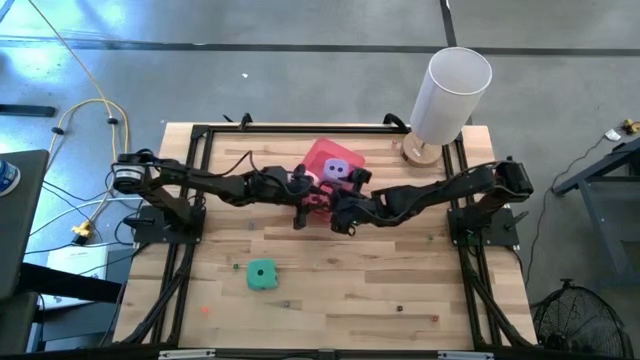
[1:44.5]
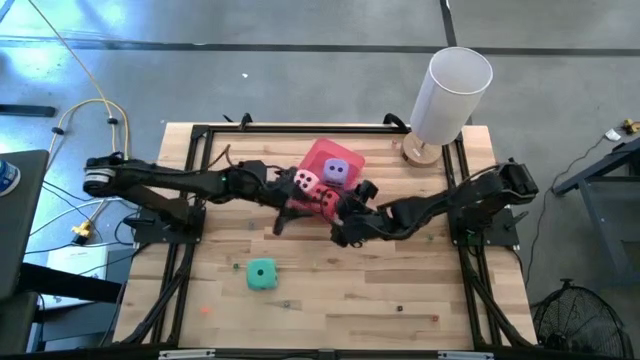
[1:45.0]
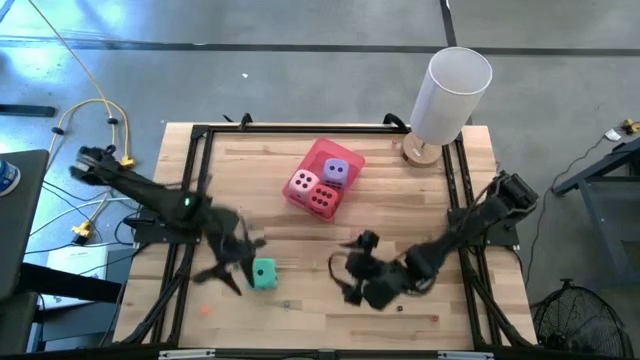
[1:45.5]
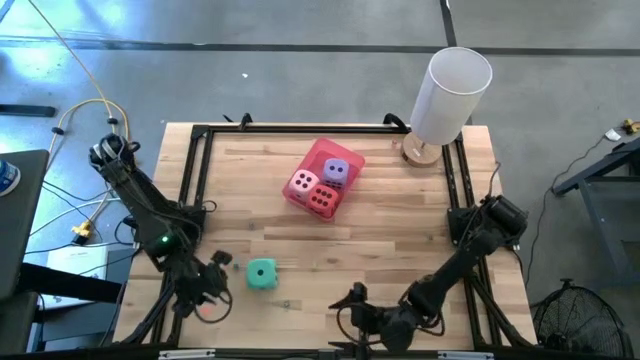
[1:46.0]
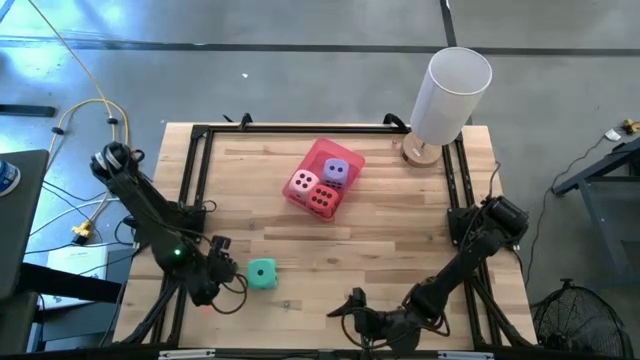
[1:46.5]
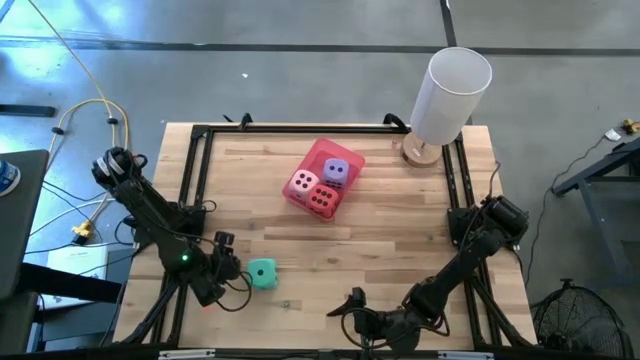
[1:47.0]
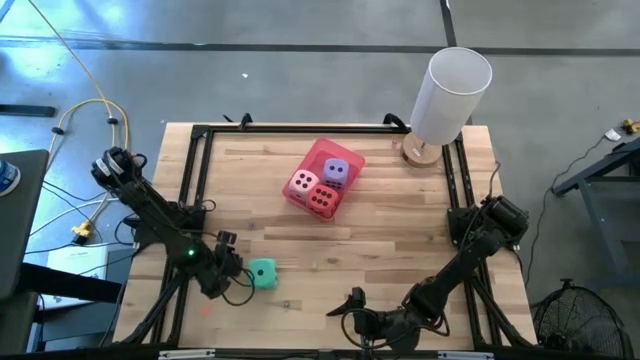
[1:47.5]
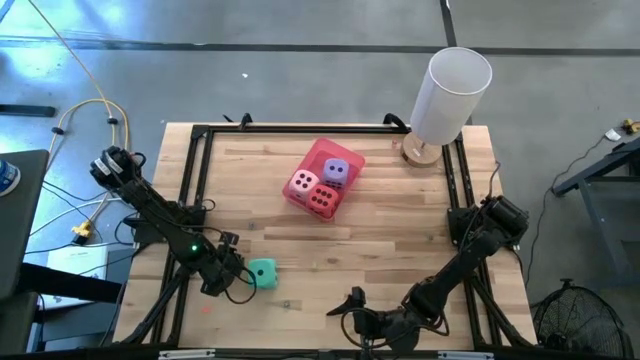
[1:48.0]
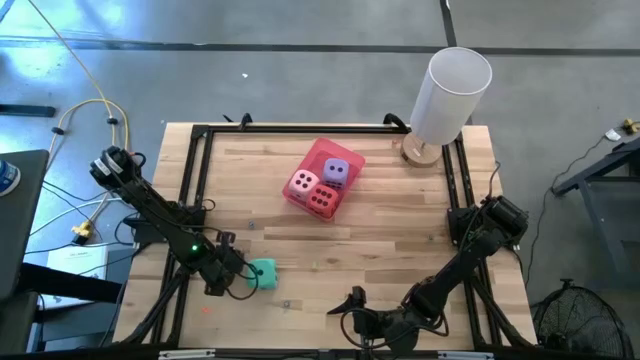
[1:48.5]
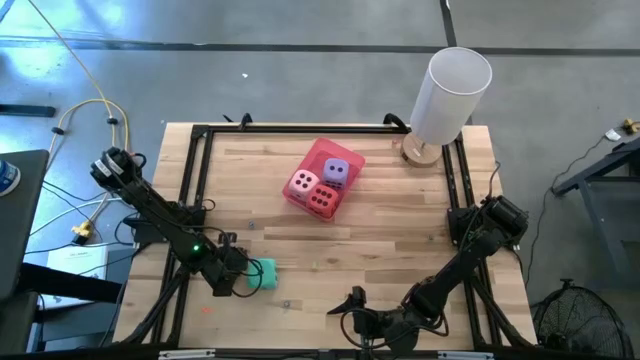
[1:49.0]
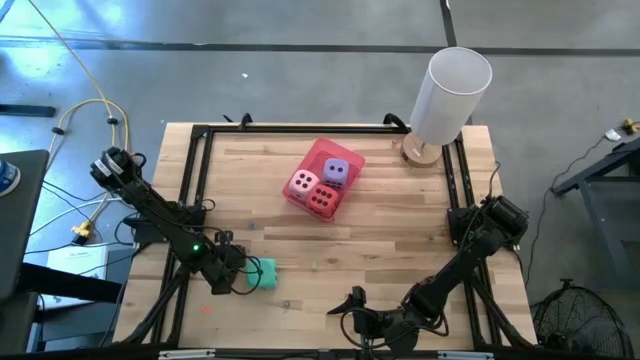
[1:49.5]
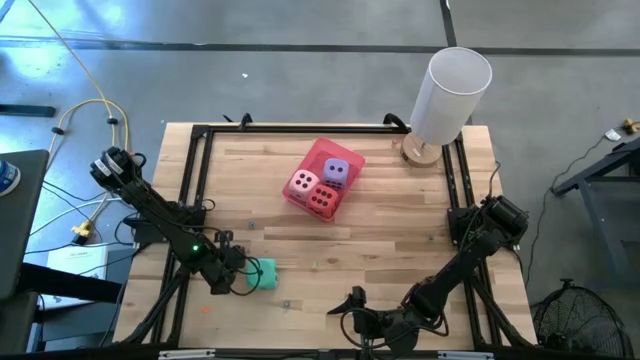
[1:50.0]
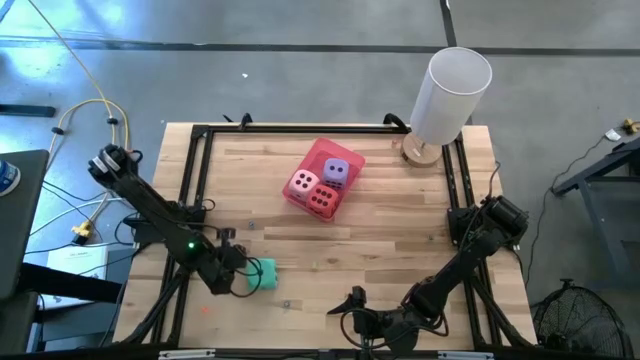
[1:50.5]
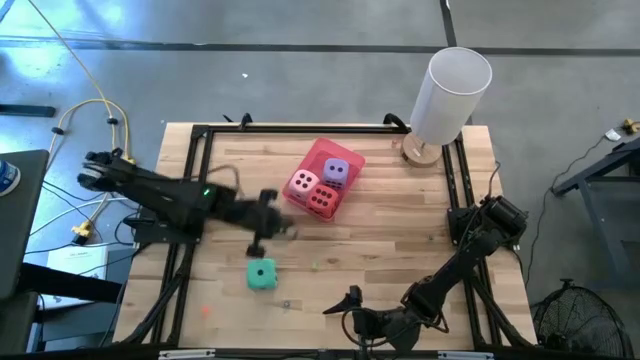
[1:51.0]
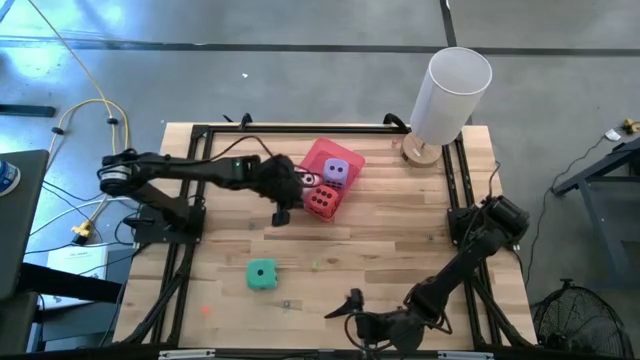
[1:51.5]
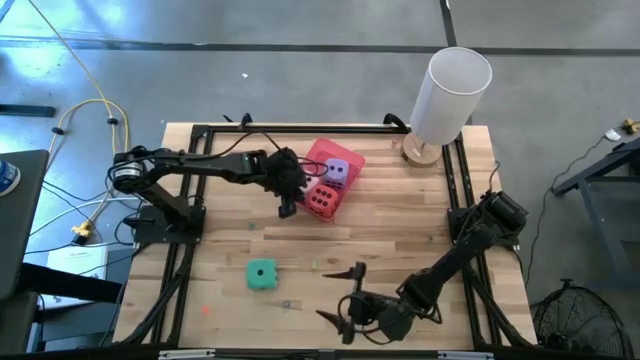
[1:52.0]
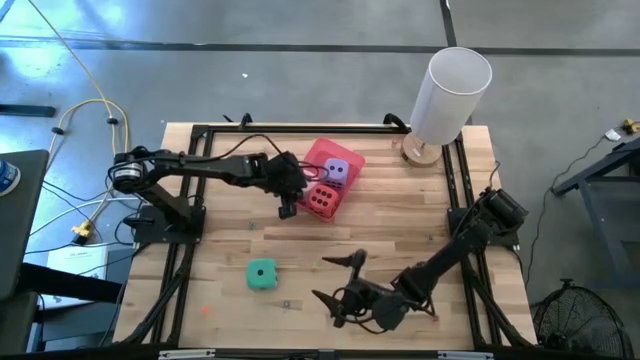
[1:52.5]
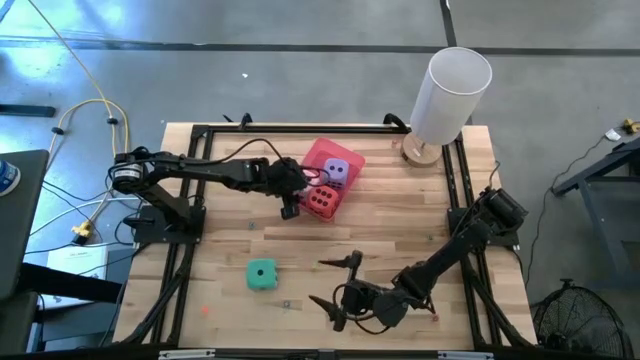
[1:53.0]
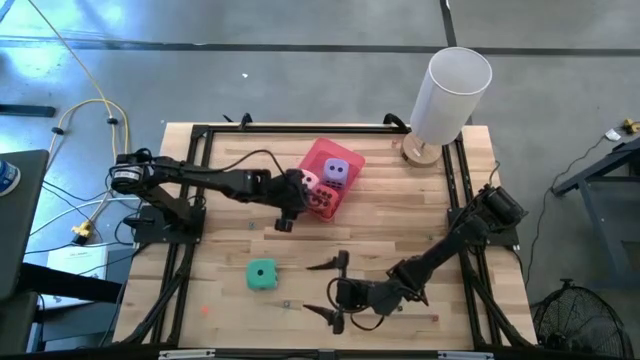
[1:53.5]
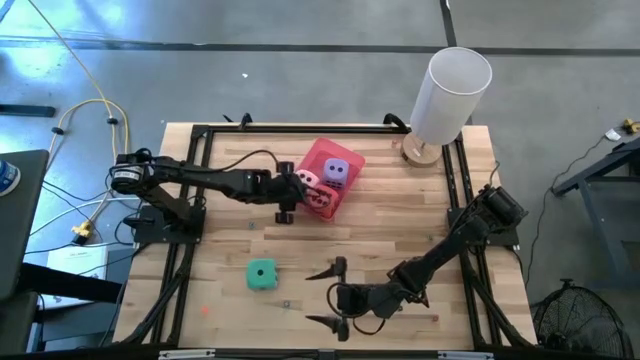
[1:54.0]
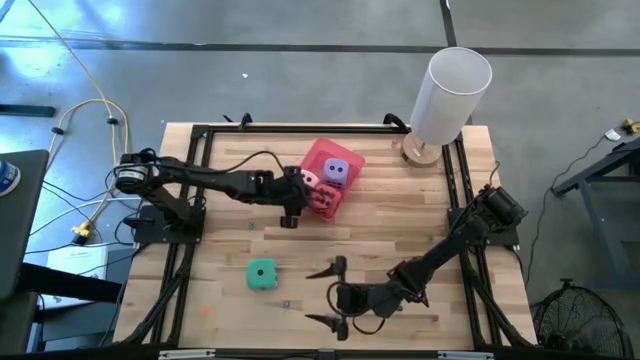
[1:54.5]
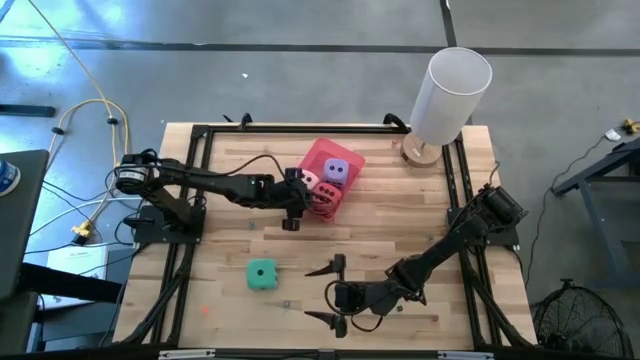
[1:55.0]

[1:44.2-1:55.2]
Task: Pick & Place Dice
Put the small green die into the red bin

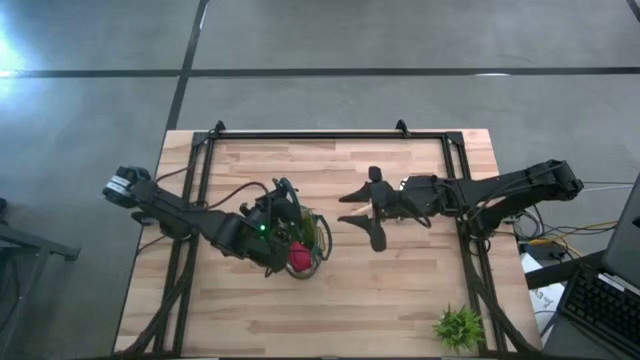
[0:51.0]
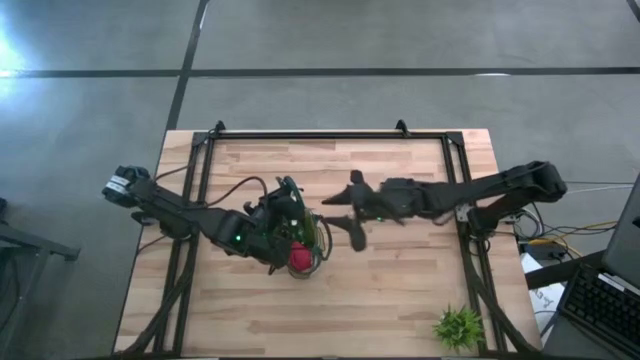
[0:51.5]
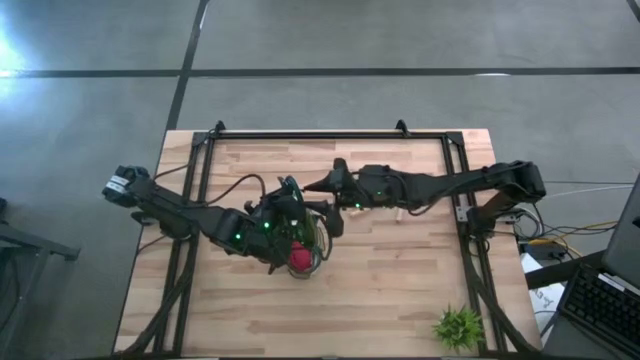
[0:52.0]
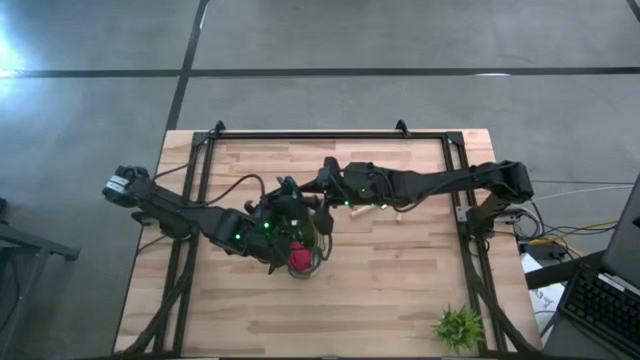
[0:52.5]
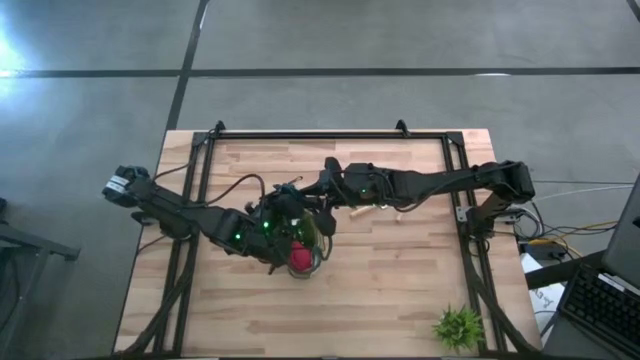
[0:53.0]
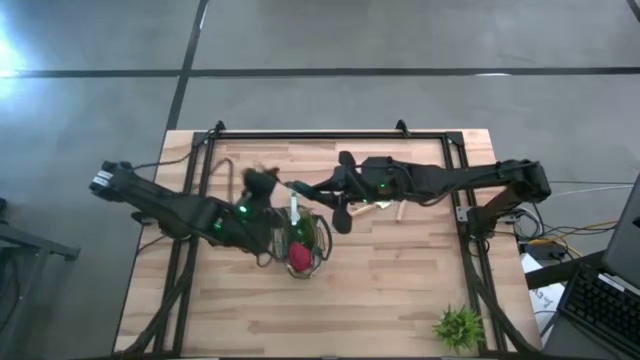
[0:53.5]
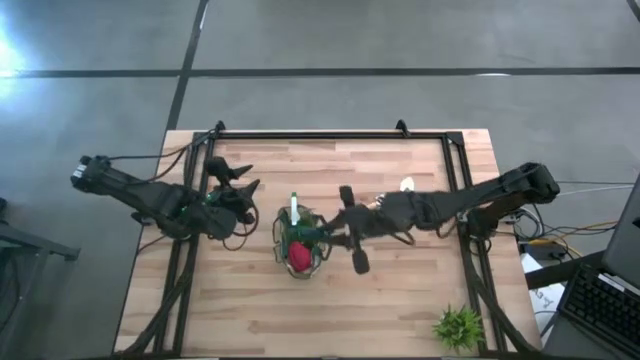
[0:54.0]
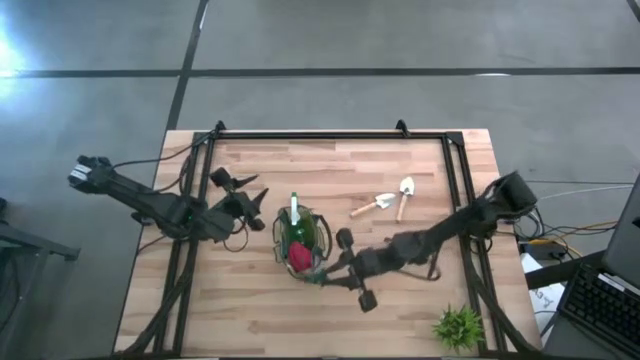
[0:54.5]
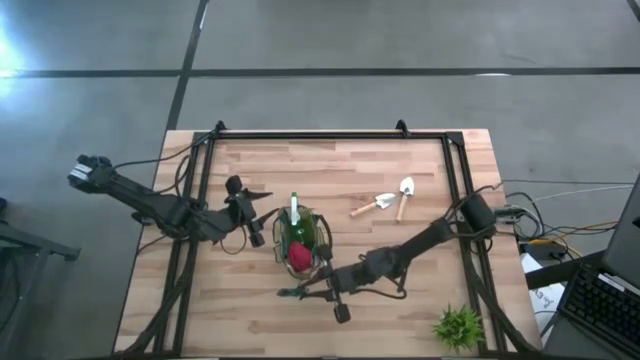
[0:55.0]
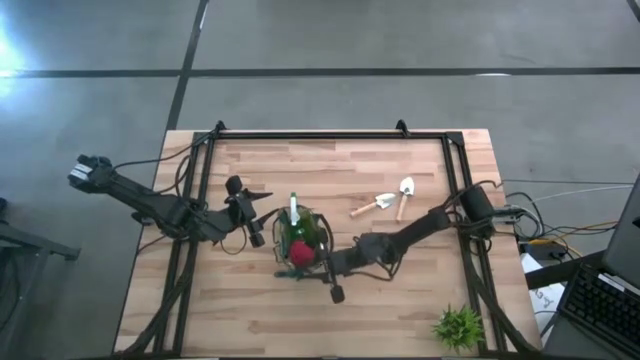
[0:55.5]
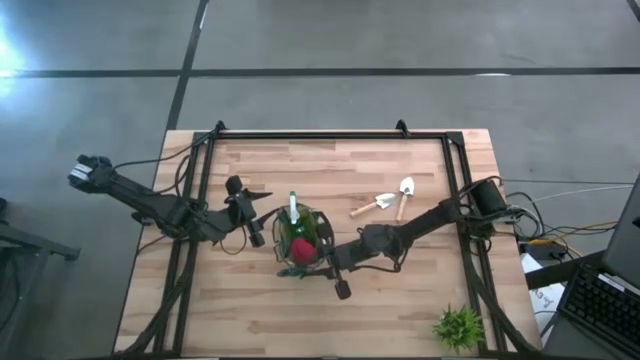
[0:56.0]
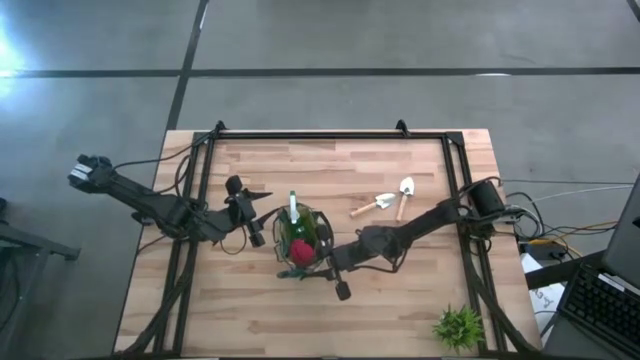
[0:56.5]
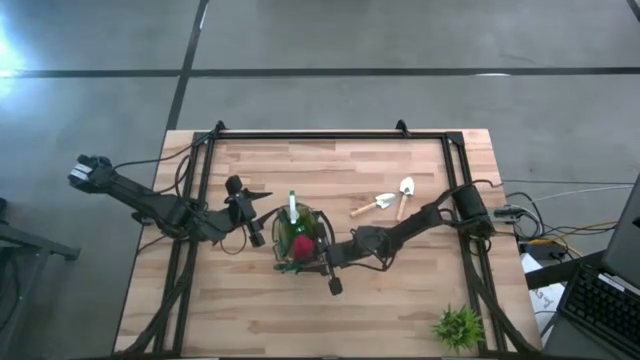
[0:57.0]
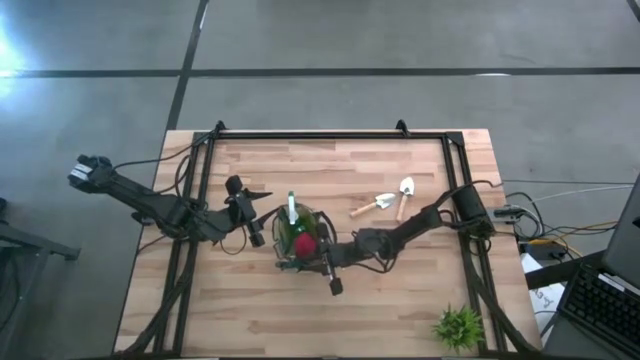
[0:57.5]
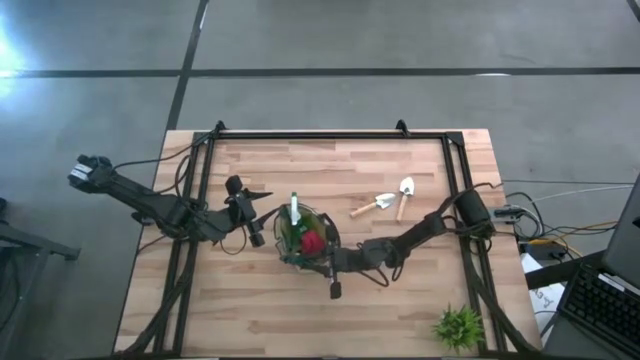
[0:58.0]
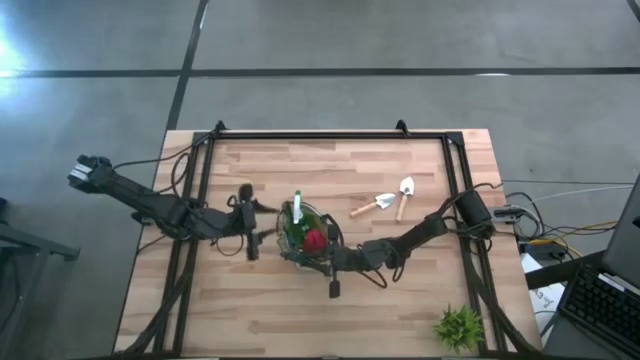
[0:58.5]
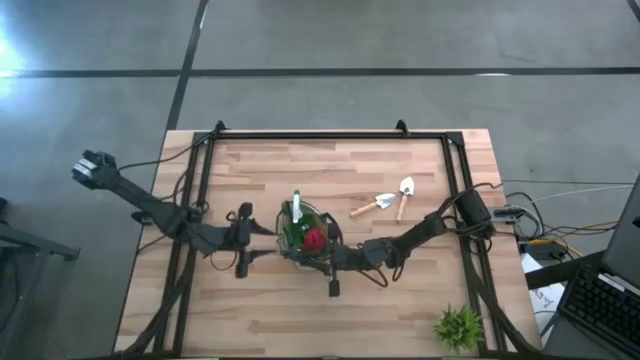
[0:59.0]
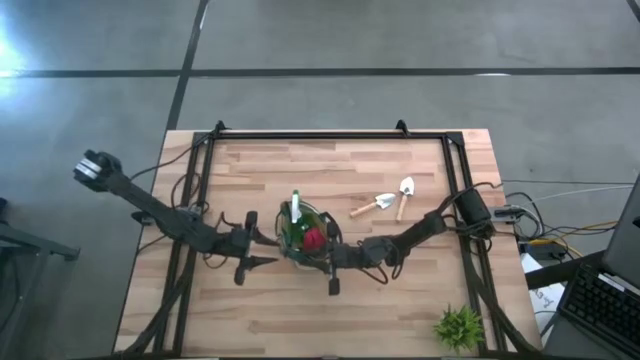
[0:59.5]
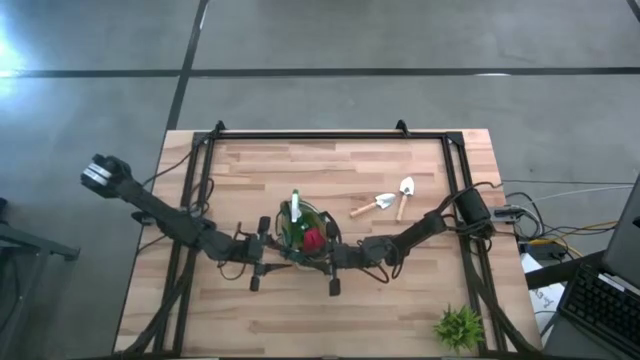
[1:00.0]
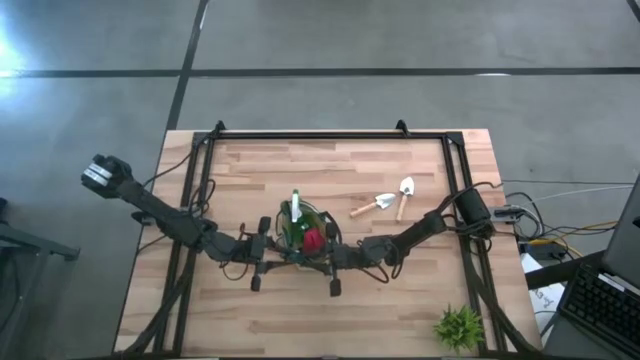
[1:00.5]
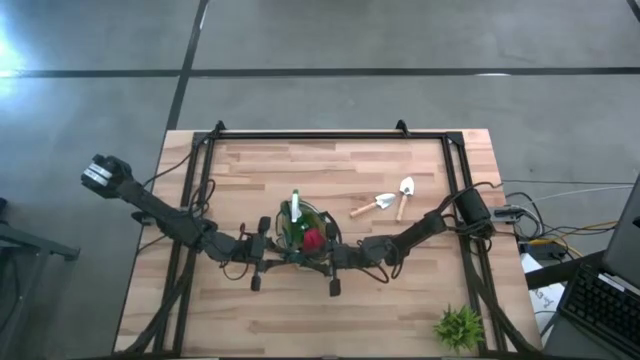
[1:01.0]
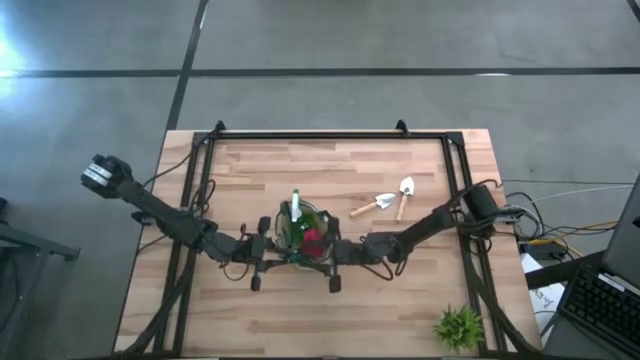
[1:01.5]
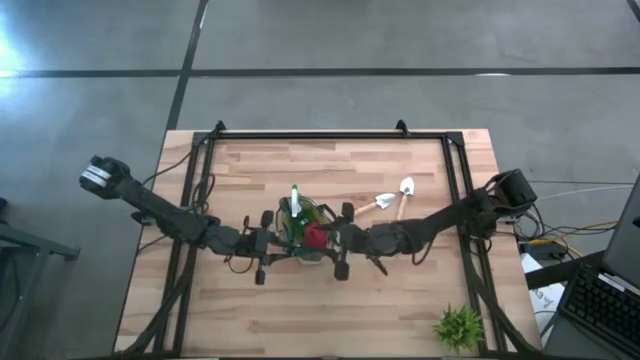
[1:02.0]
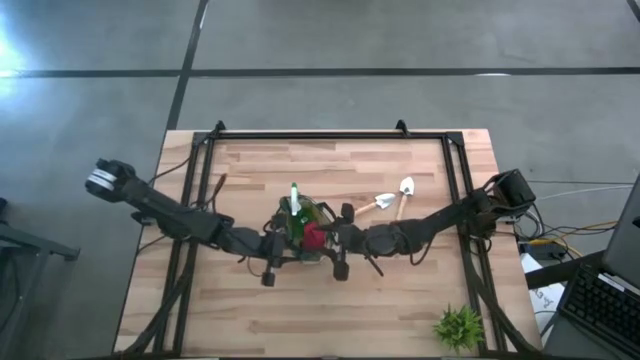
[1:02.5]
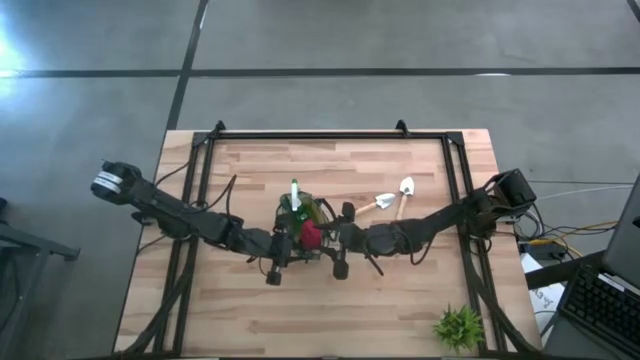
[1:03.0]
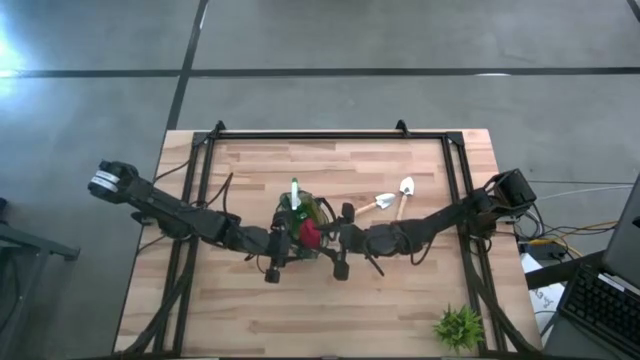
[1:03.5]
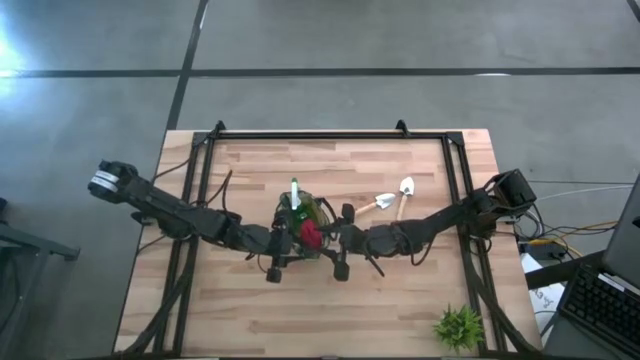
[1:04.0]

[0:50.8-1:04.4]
Task: Pick & Place Garden tools in Gardening bag
Put the green shear scissors into the gardening bag
